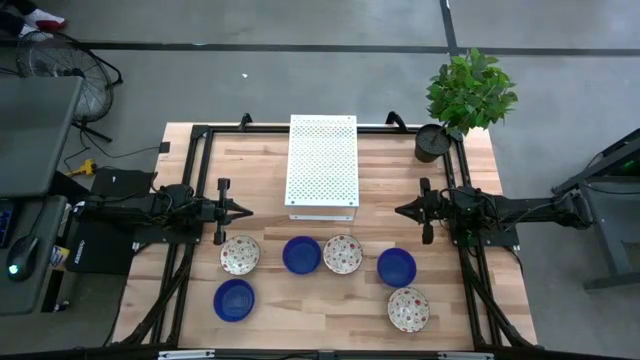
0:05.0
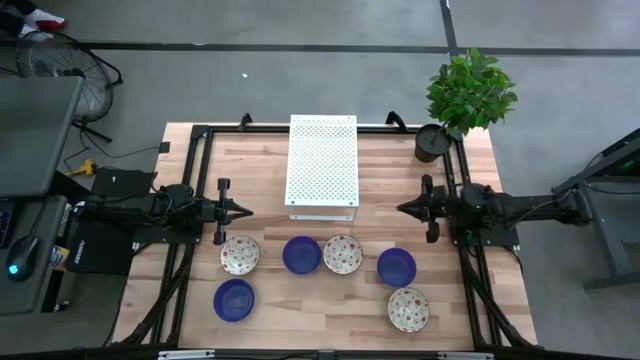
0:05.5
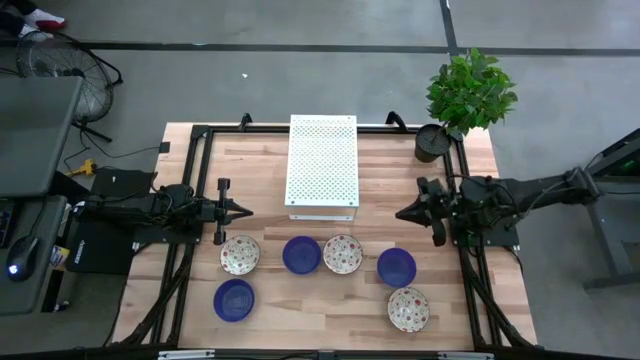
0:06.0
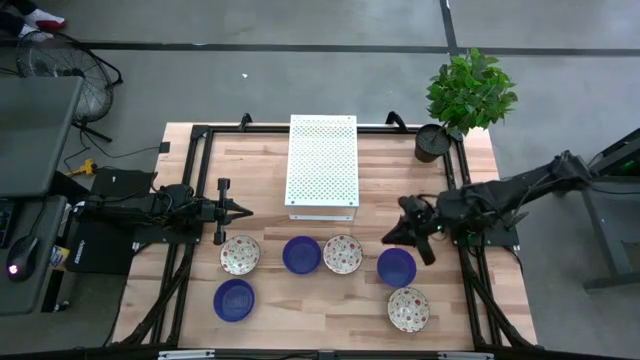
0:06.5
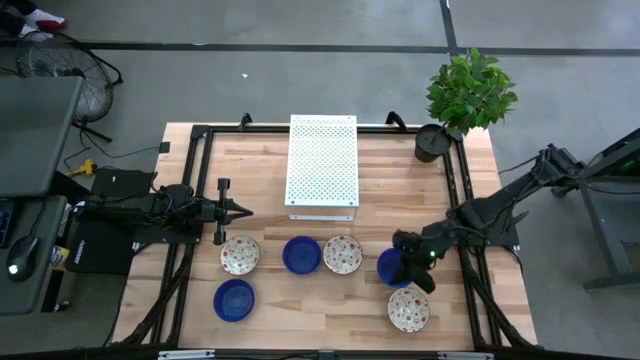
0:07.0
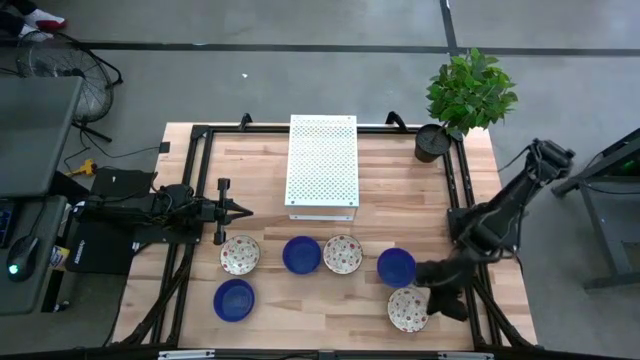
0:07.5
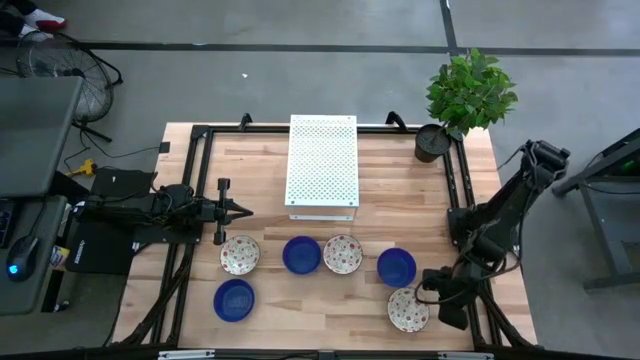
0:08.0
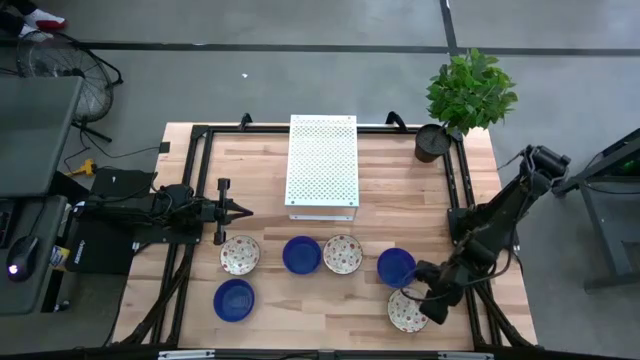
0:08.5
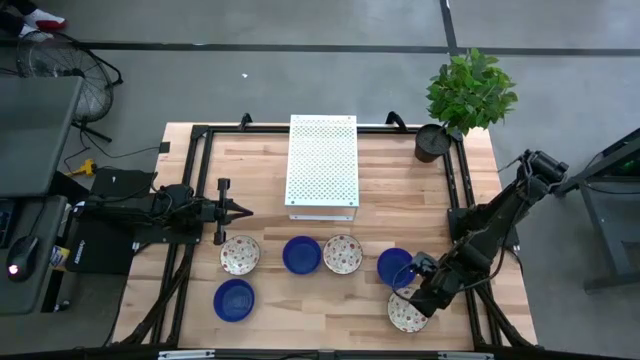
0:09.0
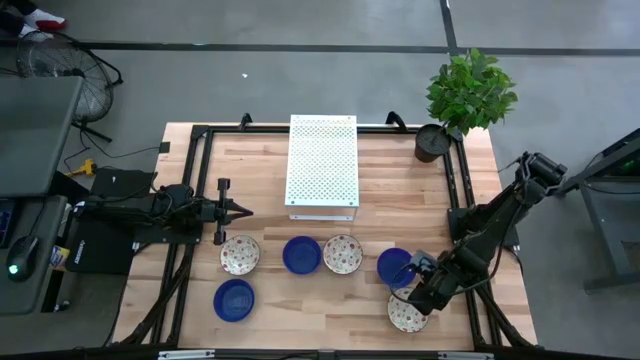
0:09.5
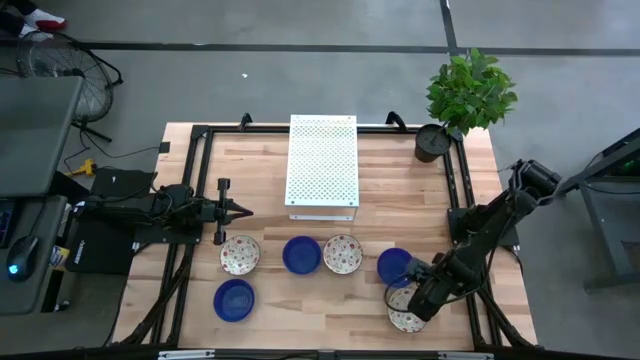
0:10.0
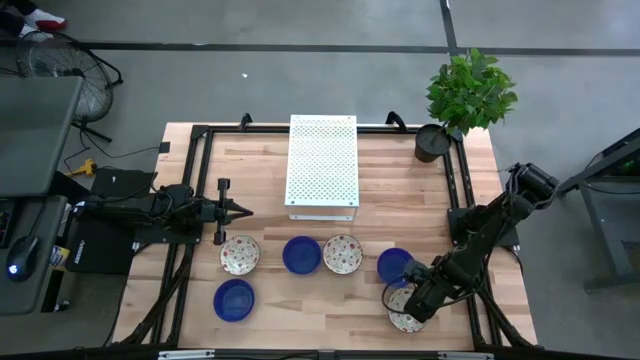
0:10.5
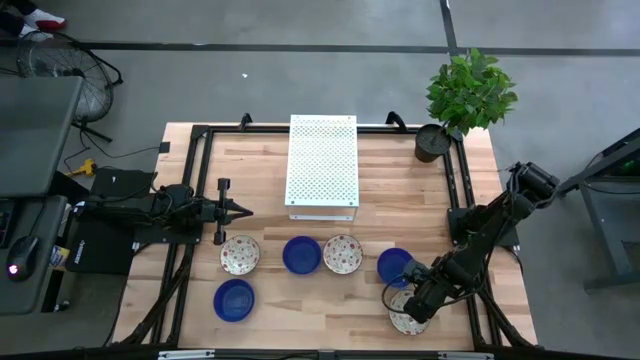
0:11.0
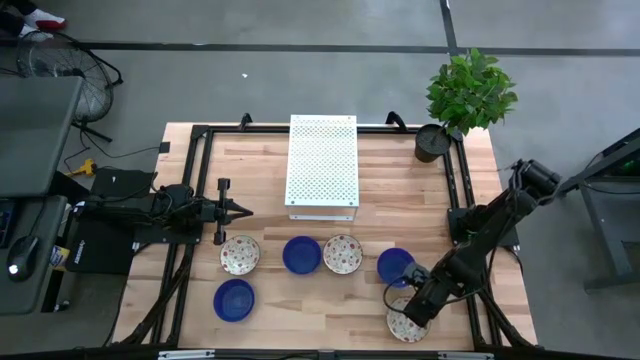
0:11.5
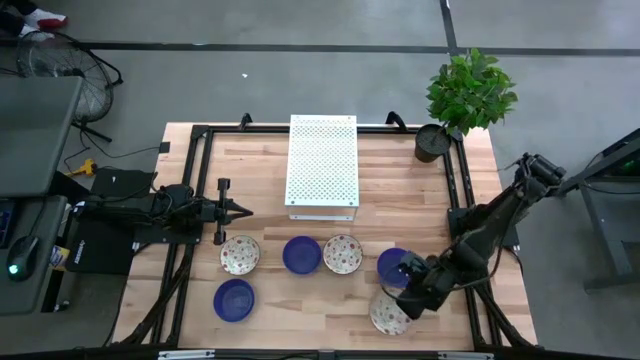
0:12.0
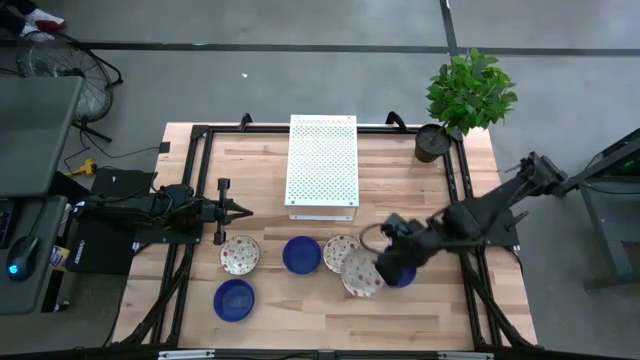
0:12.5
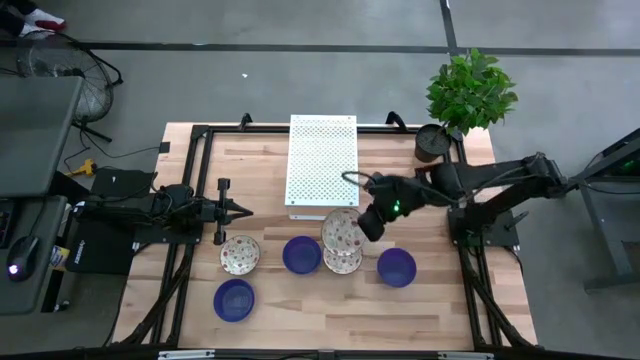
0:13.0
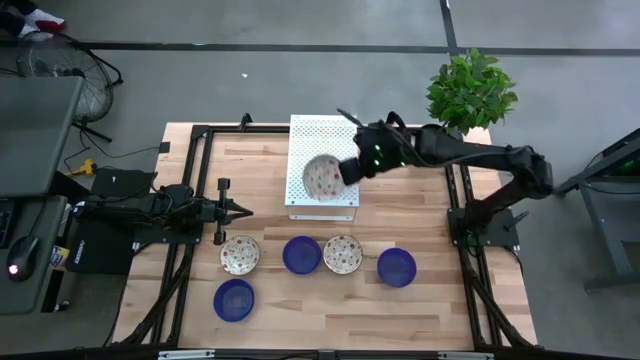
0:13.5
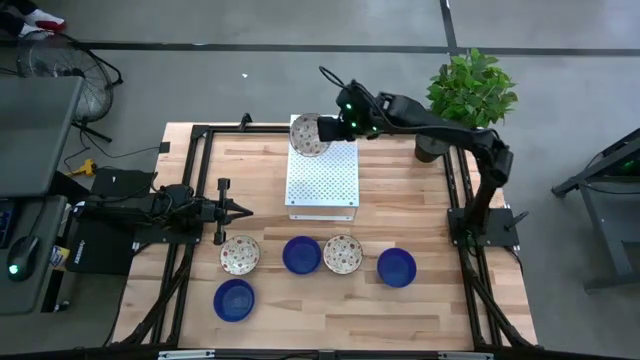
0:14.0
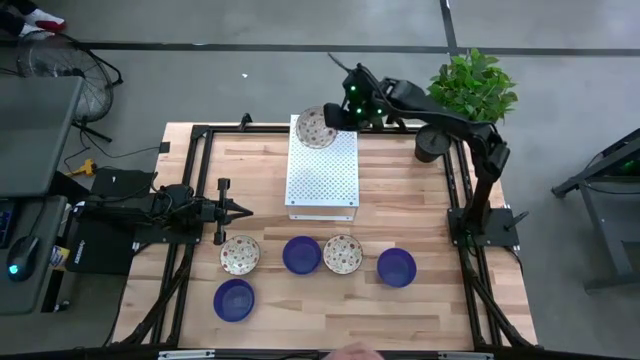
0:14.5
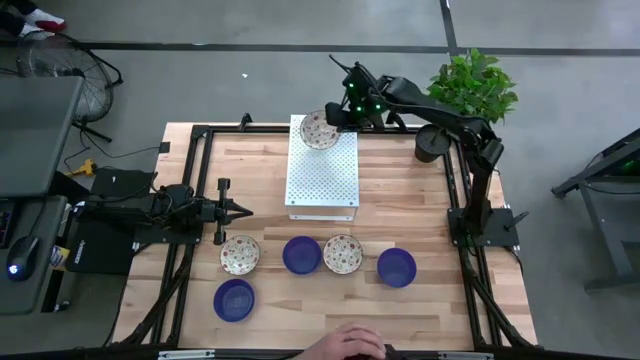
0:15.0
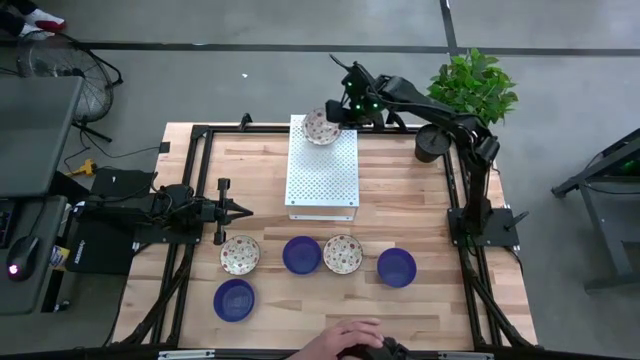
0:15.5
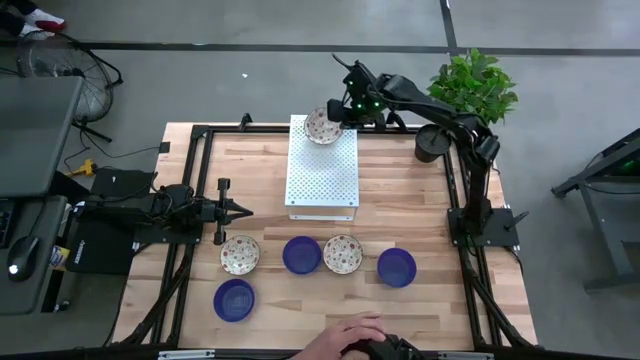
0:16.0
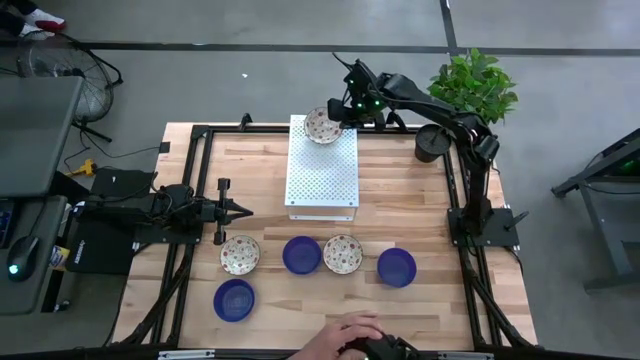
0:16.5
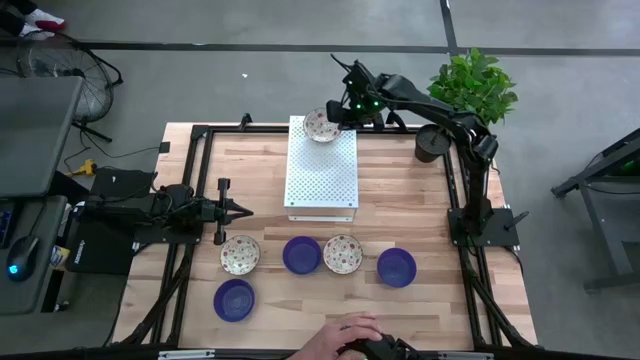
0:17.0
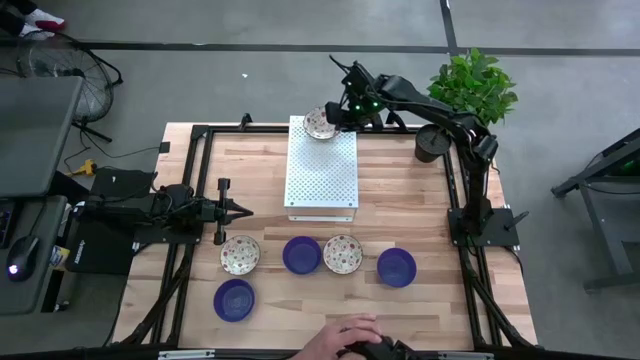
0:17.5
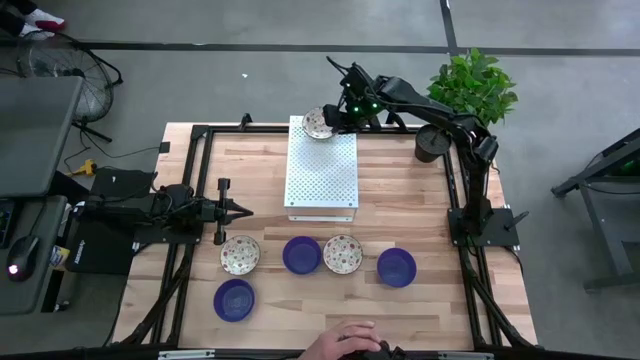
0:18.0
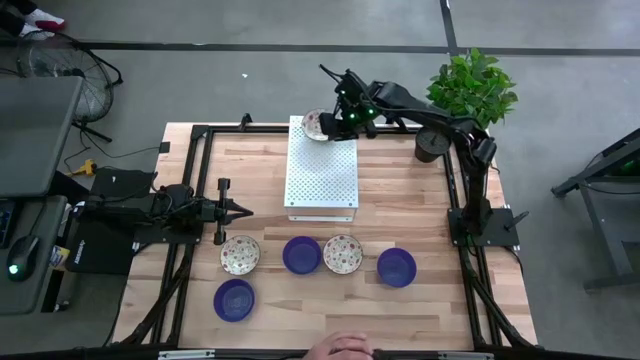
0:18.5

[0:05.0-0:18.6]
Task: Pick & Place Mini bowls
Put the bottom green bowl on the shelf

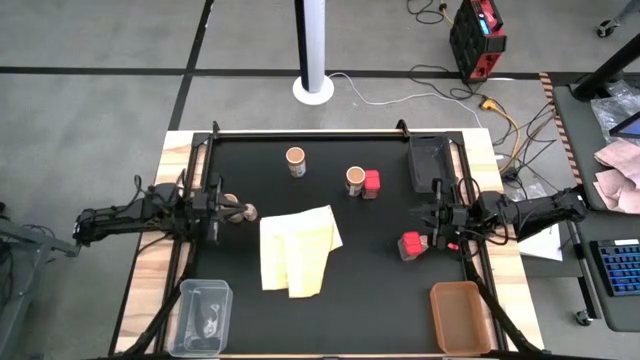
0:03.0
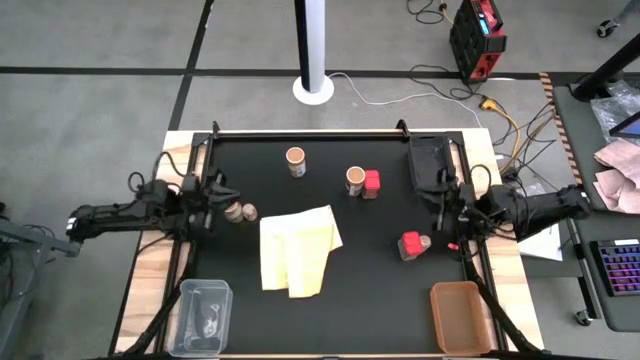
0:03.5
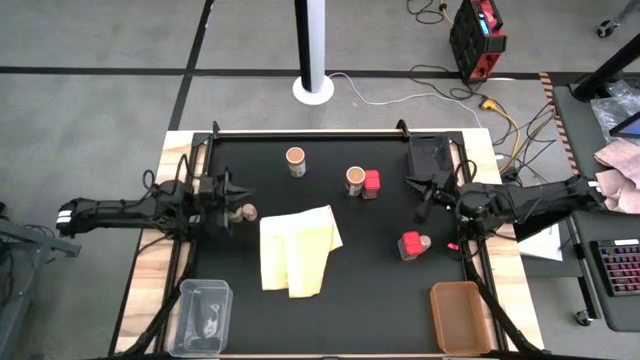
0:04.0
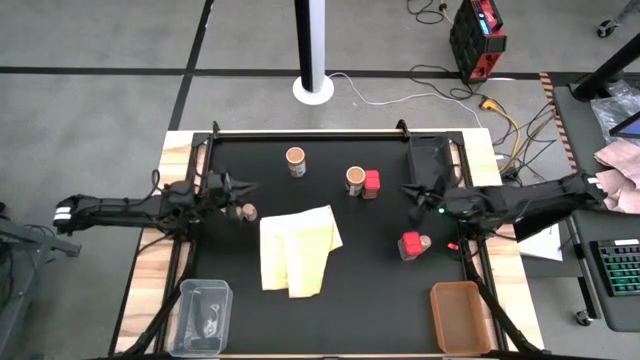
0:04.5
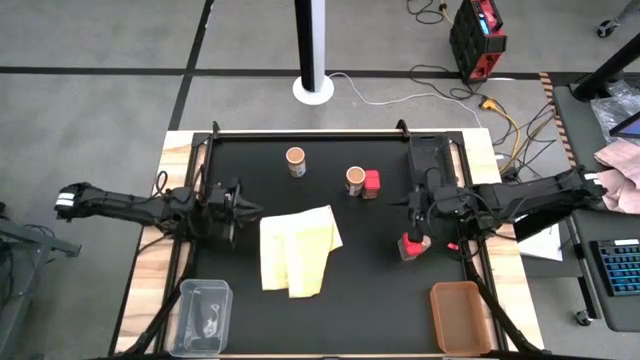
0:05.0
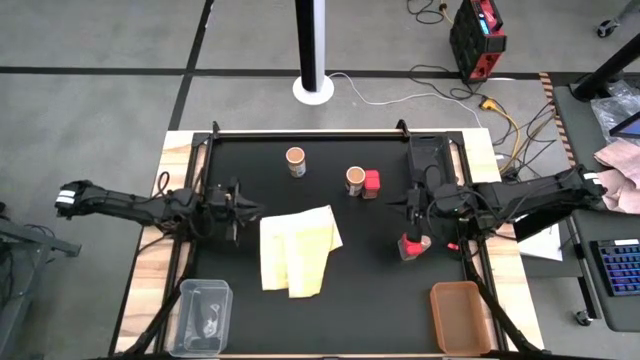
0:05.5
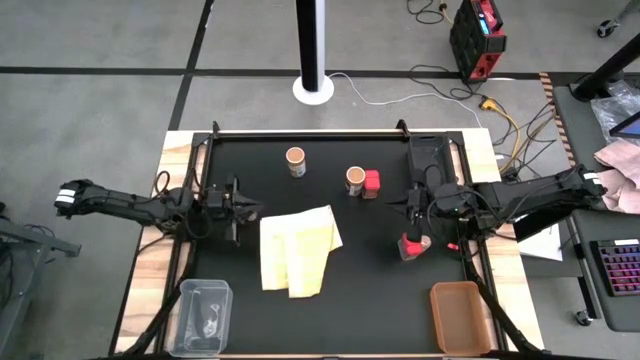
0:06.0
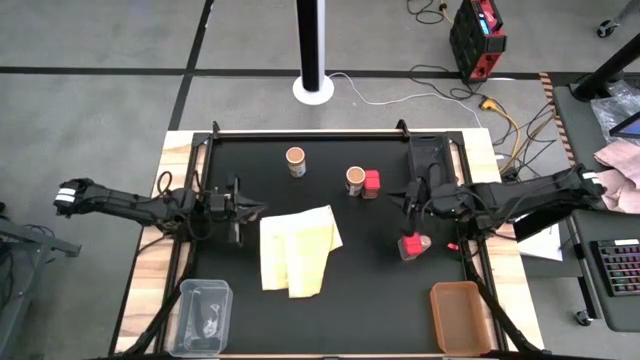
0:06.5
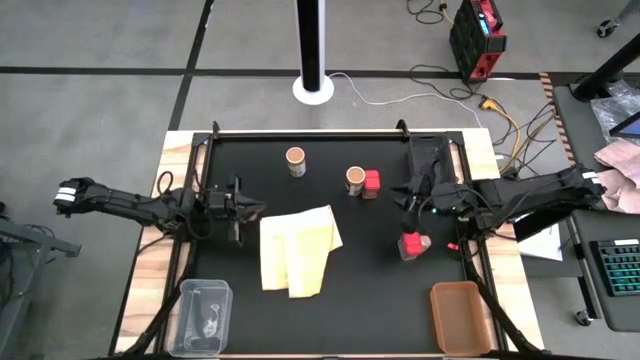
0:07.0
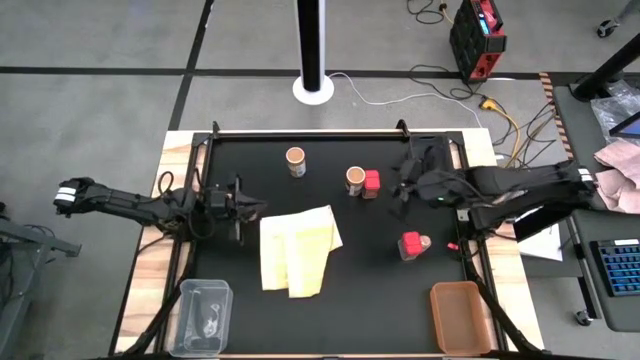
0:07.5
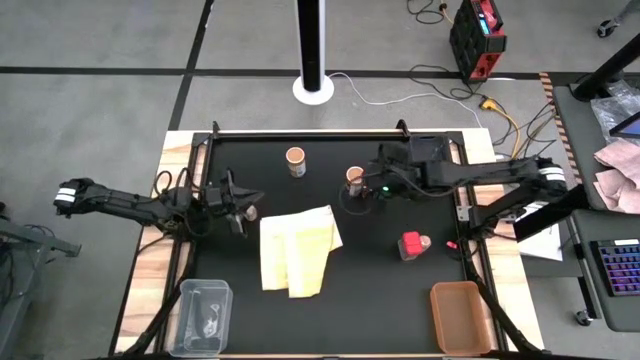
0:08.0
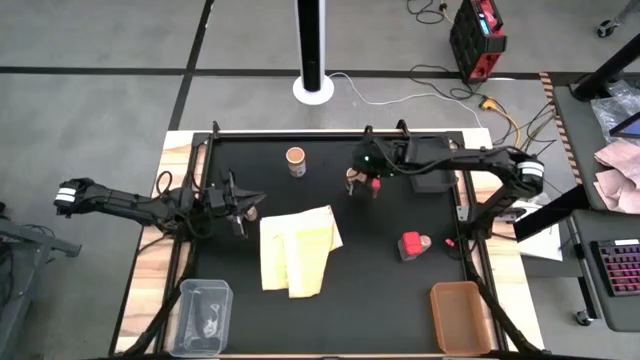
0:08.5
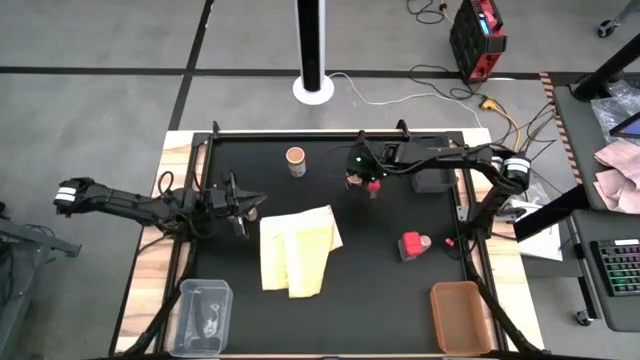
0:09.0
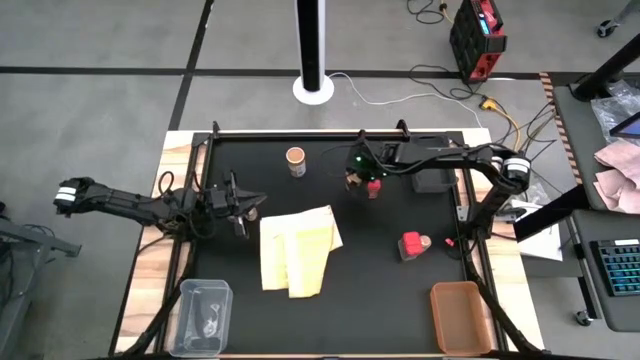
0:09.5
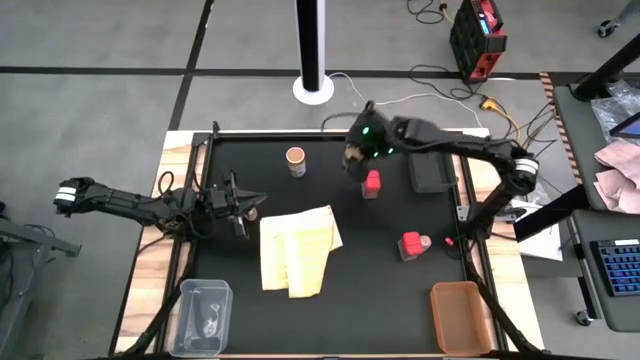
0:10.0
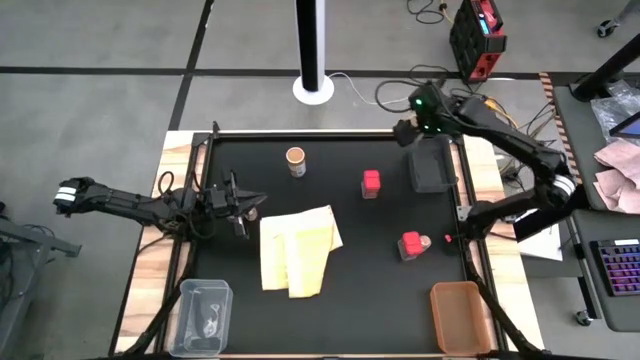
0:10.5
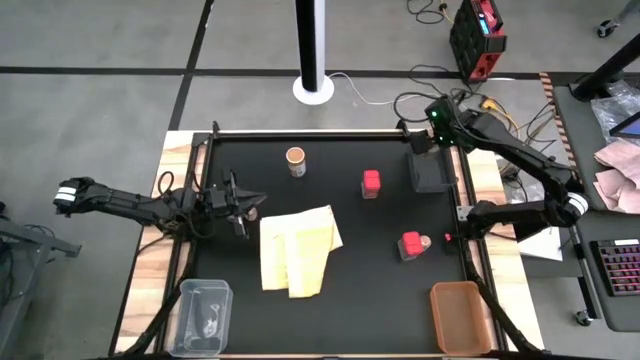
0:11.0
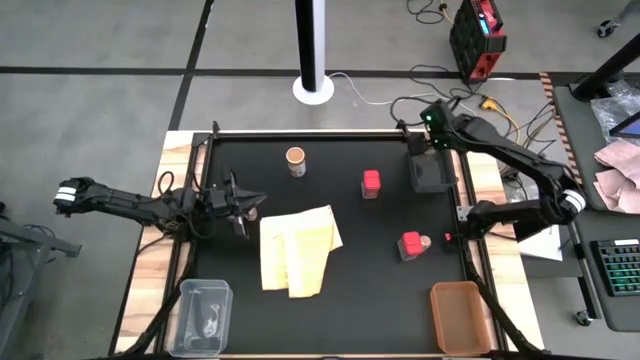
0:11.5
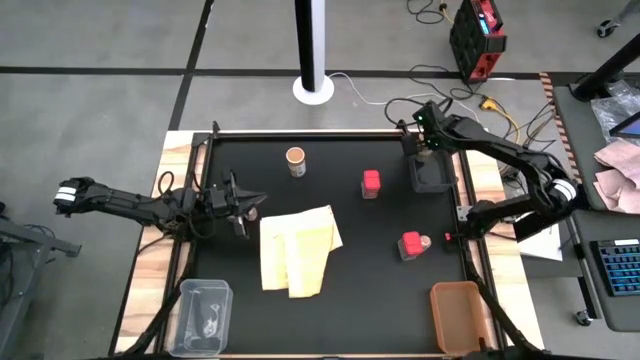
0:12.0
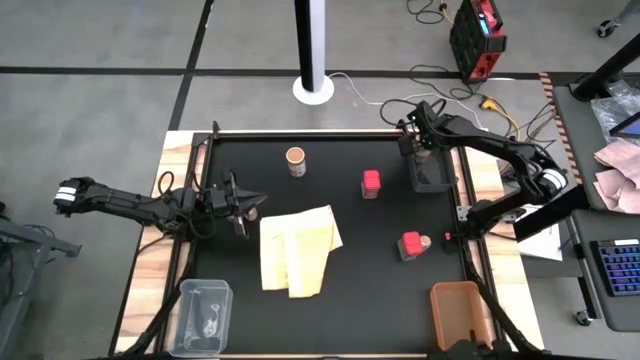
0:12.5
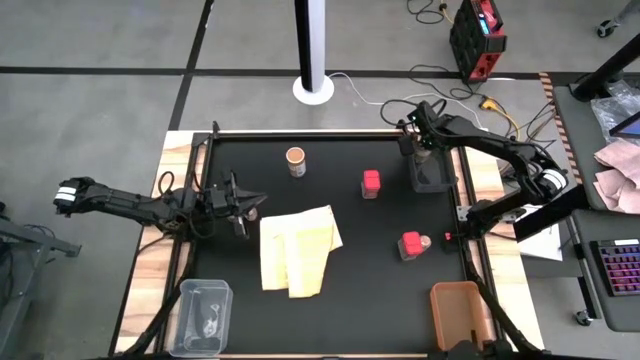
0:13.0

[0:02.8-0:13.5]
Task: Sort spices by type
Put the right golden spice bottle into black bin
